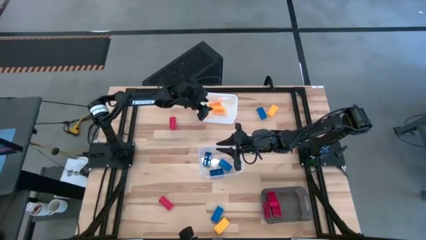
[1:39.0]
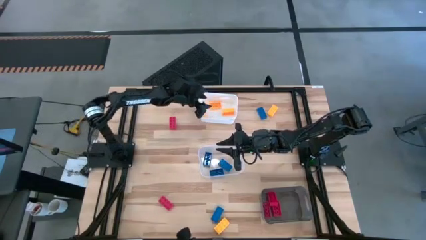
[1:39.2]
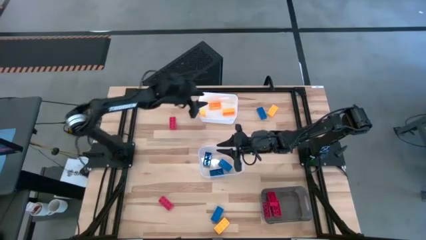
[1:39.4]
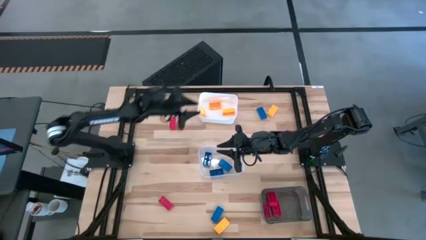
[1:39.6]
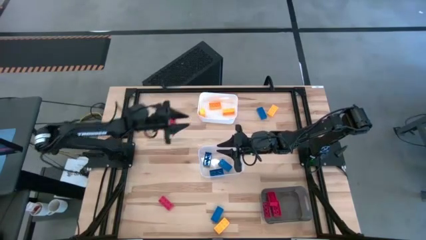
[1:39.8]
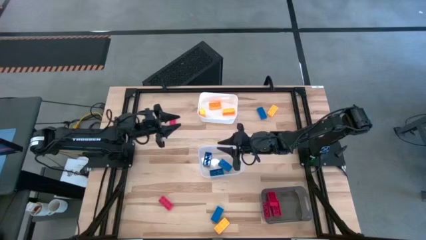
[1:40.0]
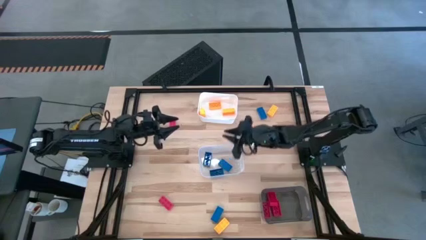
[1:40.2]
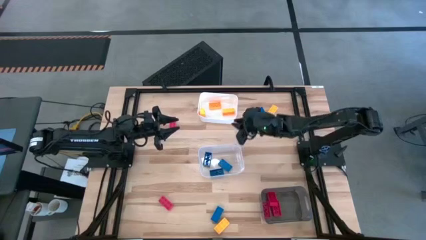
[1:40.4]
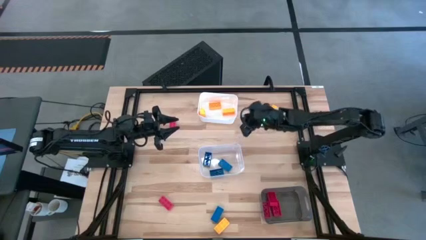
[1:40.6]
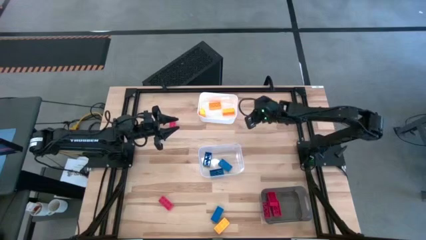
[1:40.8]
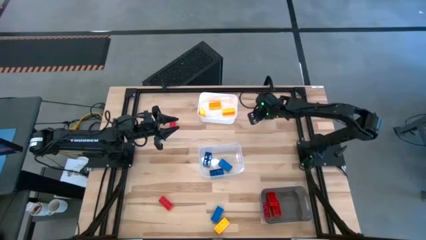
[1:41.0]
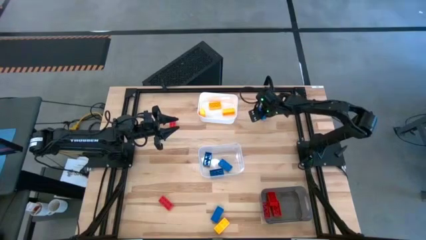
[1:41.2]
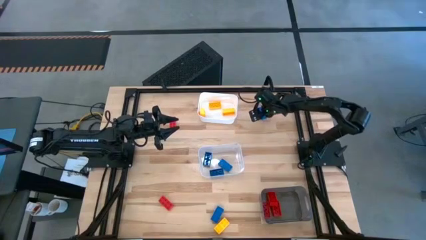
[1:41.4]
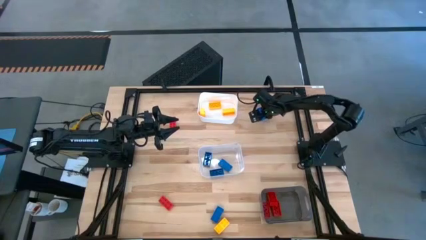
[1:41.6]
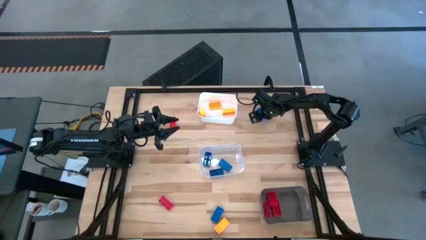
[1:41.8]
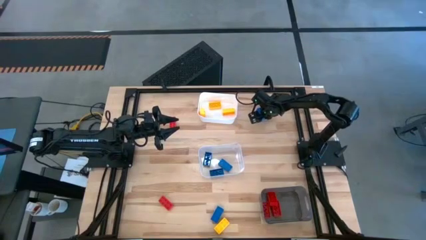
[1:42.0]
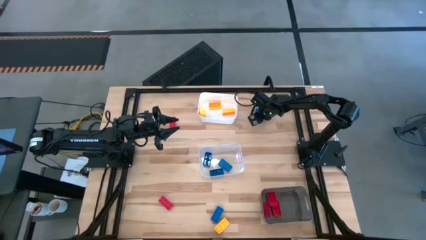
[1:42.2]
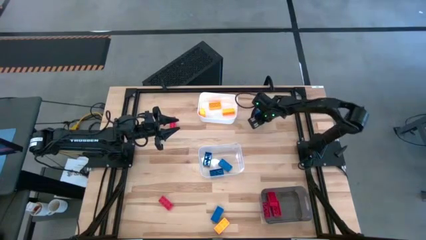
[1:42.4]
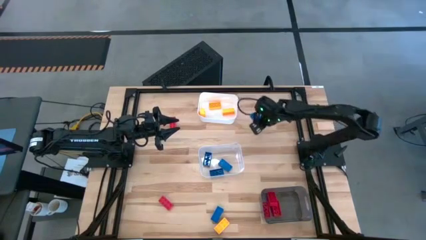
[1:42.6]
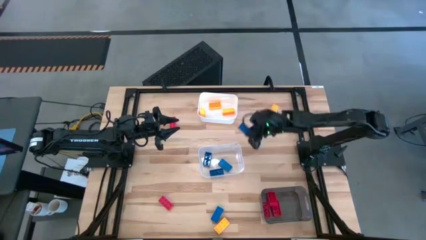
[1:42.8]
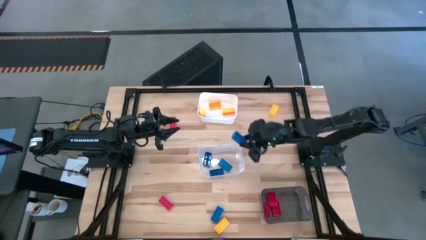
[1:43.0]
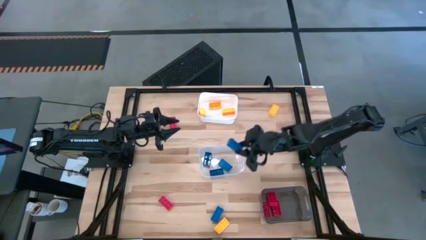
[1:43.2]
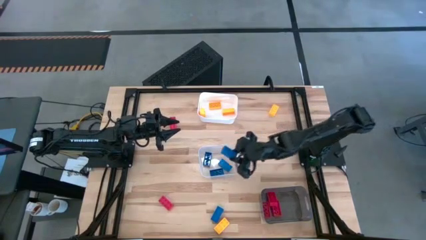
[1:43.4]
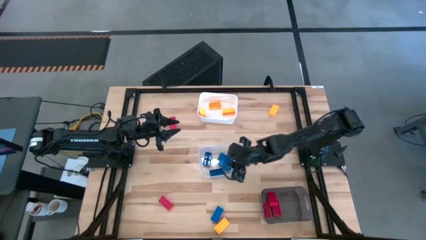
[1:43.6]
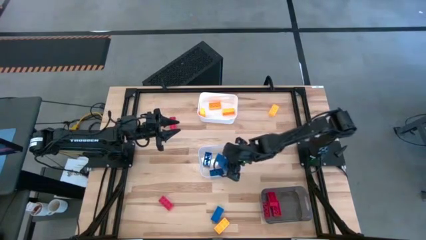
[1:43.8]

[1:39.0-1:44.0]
Task: Sort & place blocks by color
Put the blue game piece into the transparent bin

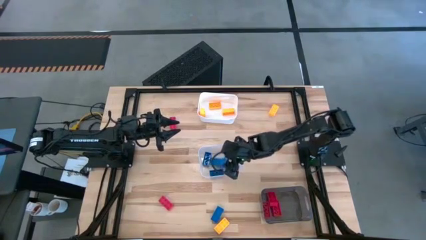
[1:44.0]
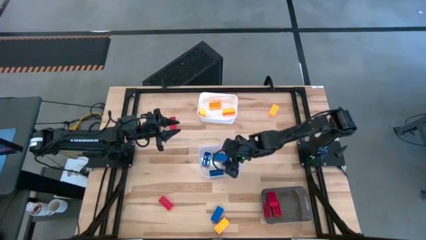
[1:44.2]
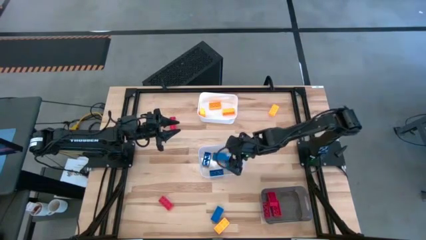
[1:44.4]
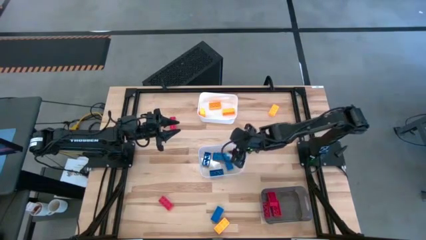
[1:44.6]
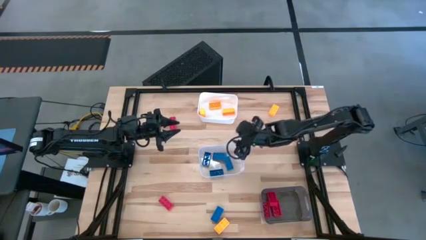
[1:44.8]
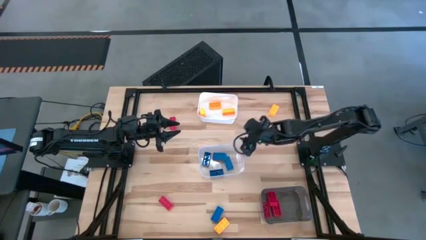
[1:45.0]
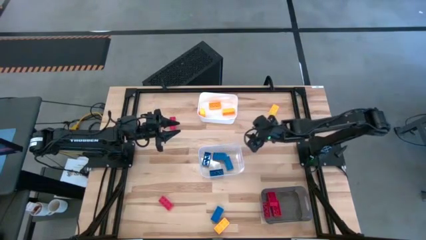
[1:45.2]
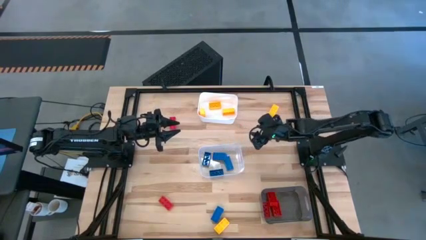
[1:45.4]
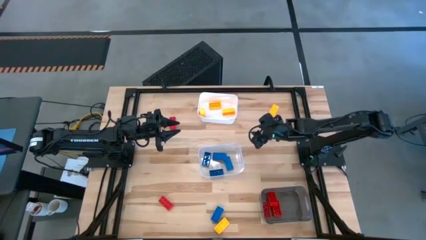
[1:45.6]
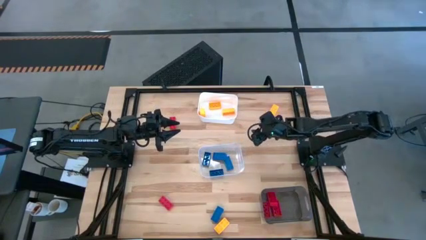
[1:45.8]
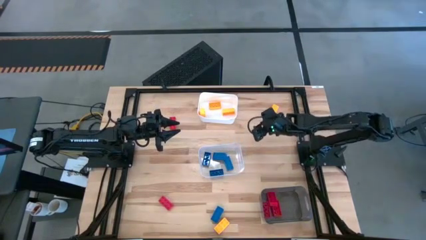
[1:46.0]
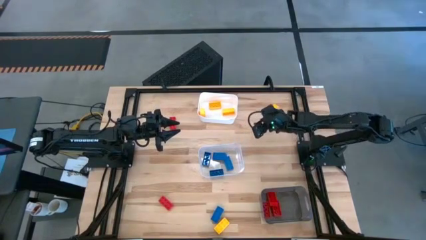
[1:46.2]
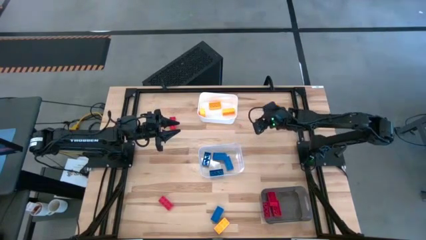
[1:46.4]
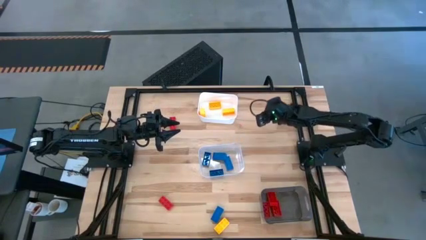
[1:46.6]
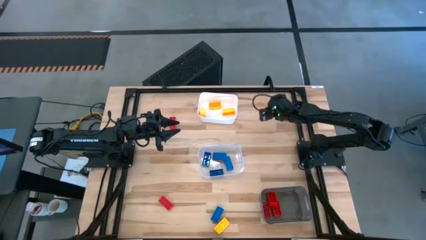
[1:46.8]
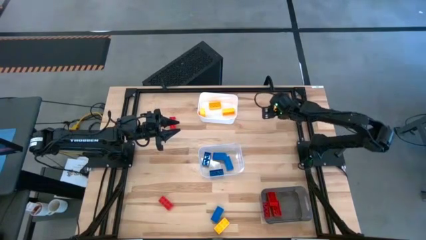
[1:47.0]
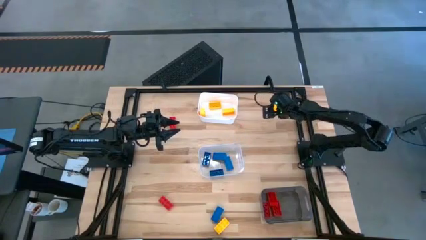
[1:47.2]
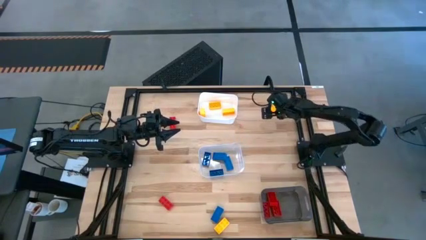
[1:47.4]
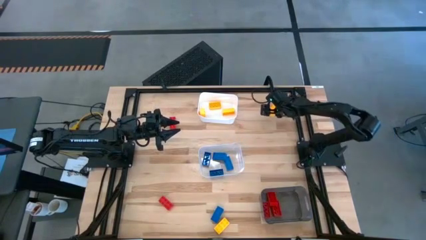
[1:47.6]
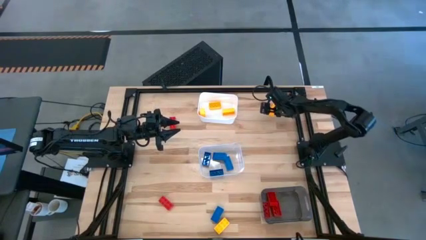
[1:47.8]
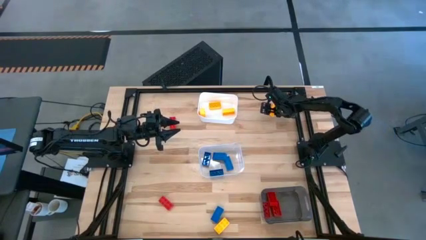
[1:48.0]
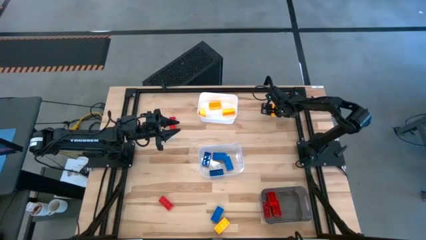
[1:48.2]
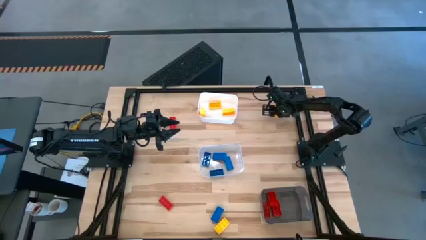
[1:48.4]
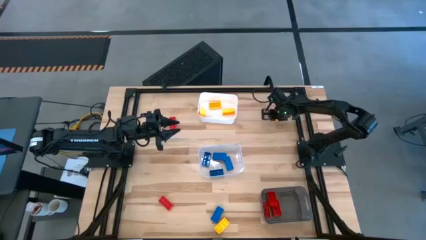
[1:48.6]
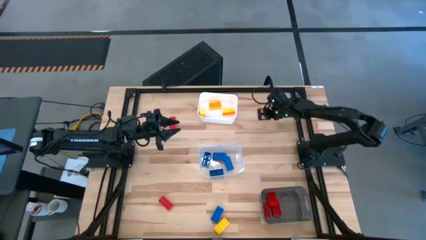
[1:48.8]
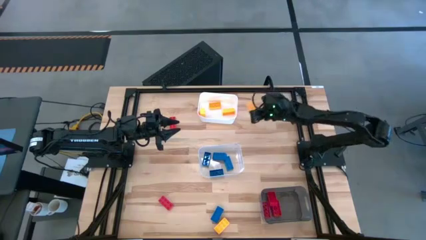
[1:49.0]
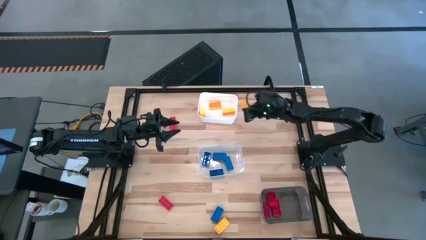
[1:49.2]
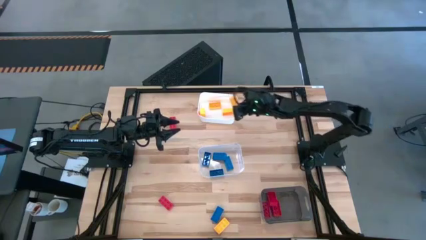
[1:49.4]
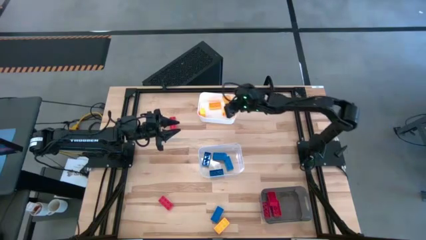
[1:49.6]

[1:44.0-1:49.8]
Put the yellow game piece into the white bin

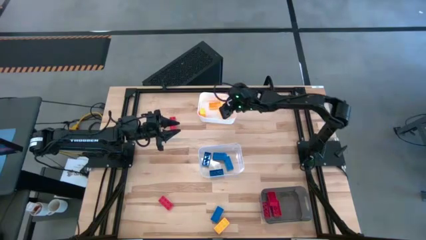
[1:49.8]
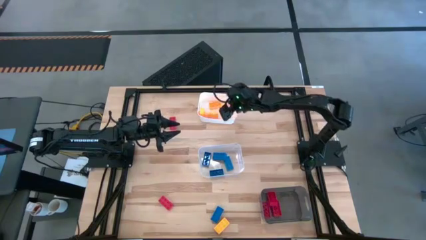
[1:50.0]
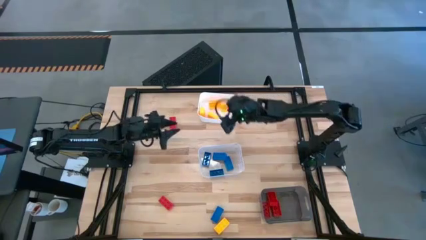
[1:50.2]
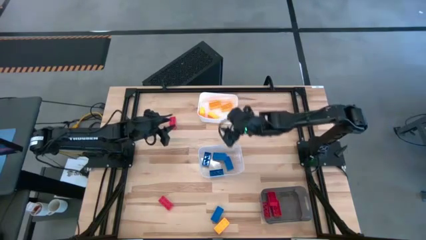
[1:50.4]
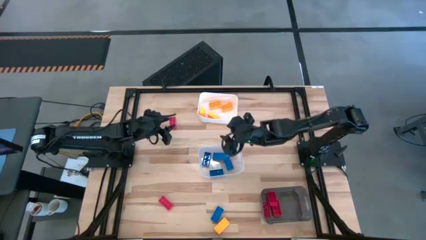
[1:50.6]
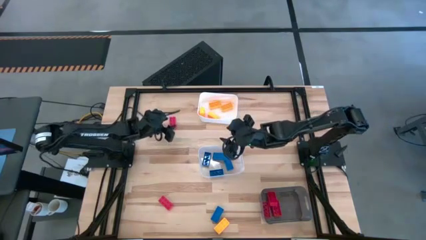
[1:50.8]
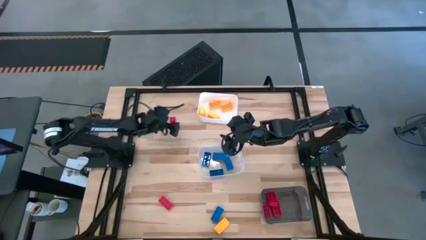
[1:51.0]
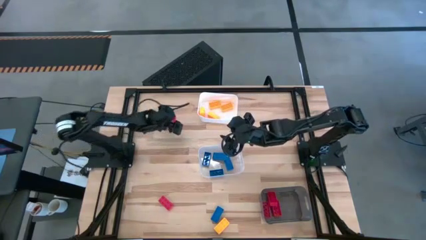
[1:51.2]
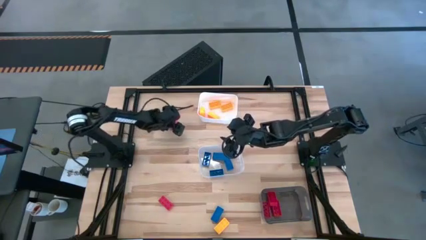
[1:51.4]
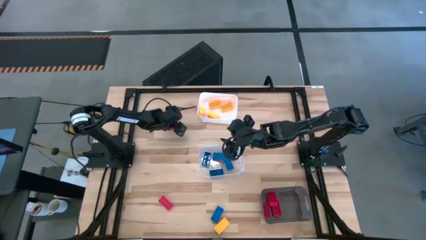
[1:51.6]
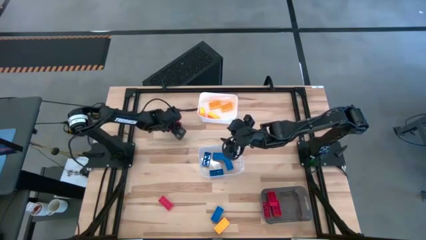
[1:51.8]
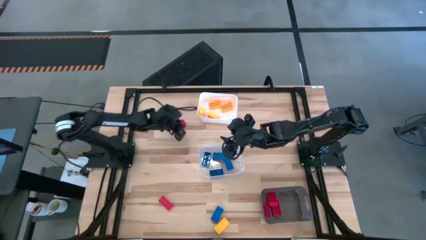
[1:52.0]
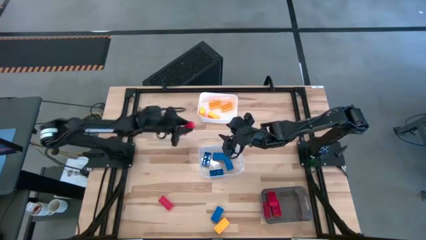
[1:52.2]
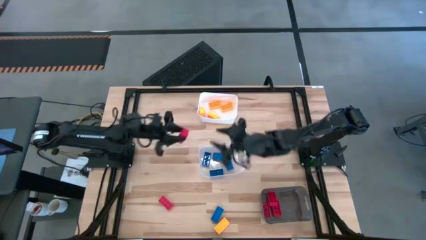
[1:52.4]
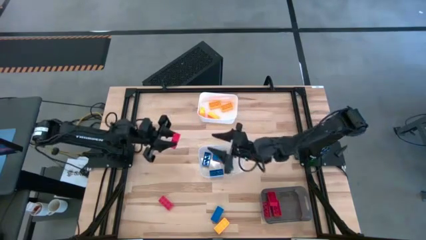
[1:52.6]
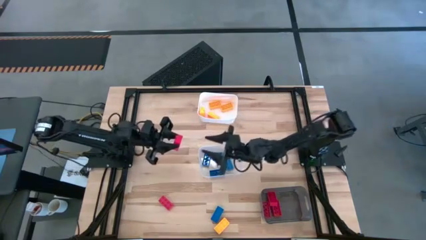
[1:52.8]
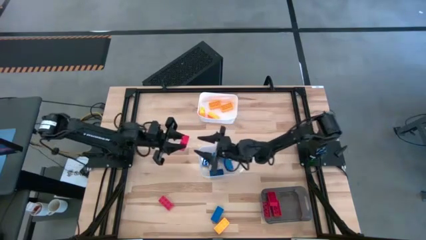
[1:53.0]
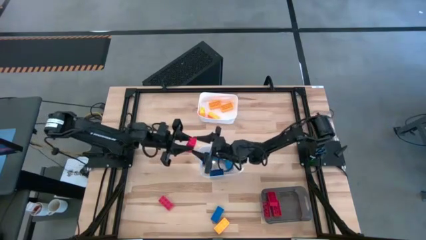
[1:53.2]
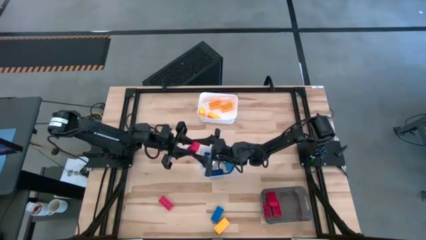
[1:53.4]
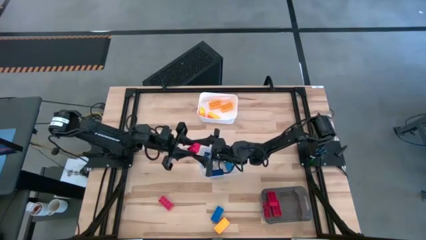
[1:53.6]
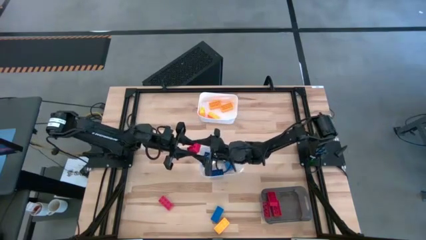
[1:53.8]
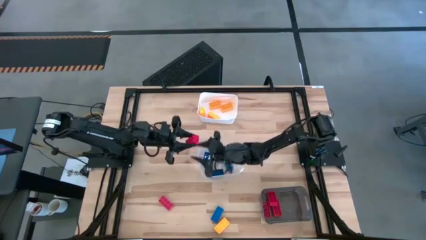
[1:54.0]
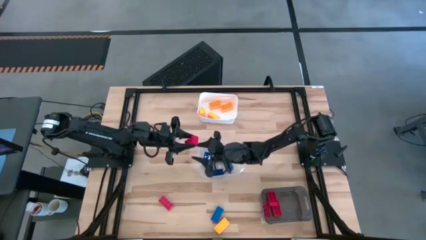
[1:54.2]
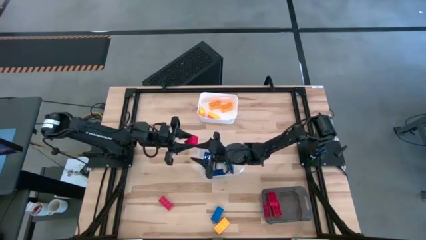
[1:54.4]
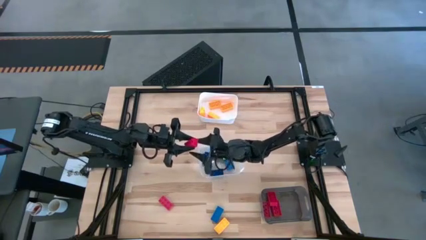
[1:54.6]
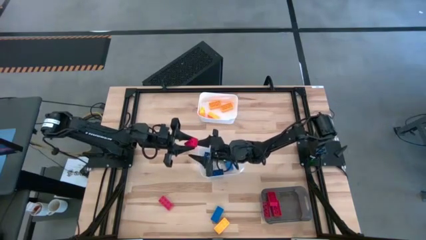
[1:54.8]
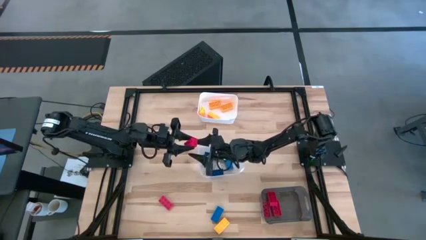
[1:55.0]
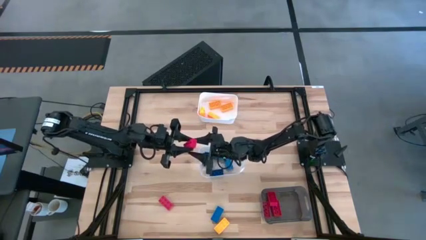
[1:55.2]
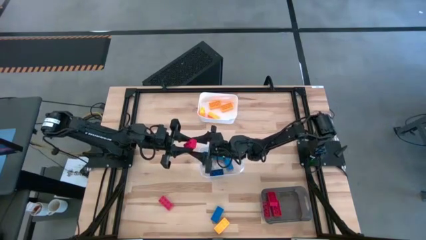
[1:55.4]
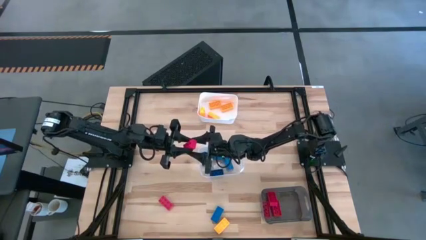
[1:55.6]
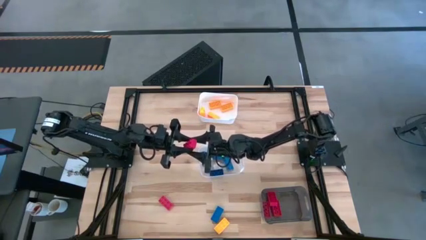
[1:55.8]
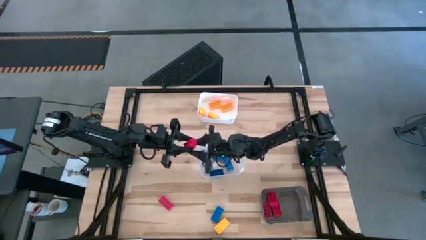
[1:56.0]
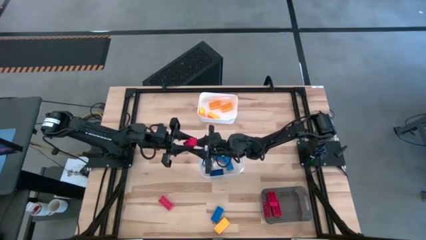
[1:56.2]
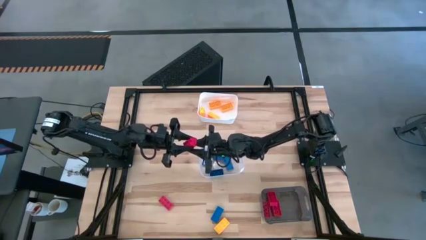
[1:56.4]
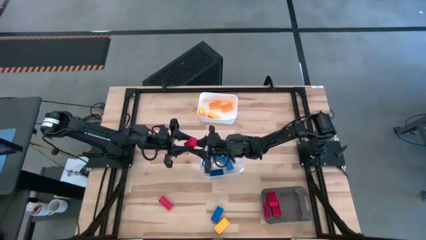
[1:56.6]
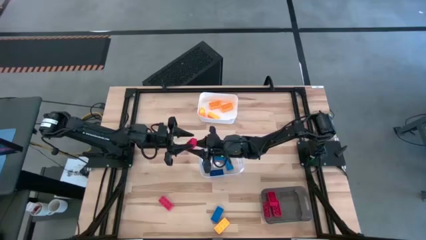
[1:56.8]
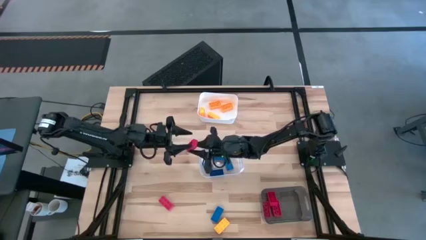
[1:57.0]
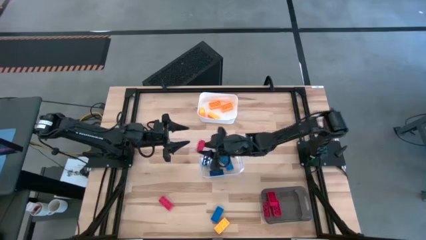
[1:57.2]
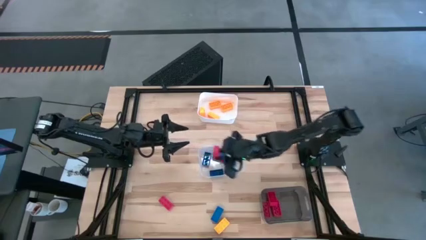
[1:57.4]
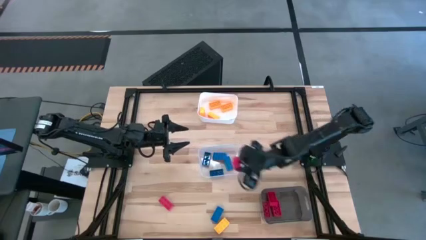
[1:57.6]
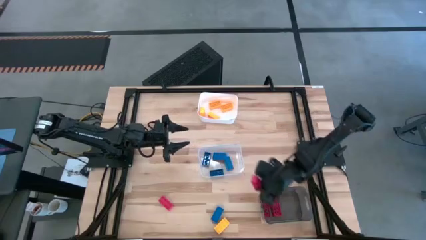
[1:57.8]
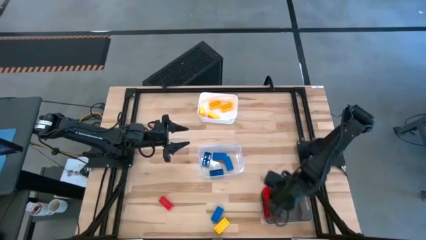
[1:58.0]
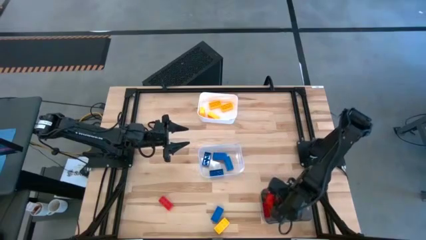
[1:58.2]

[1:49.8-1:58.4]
Put the red game piece into the black bin
